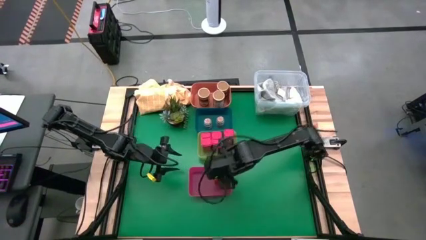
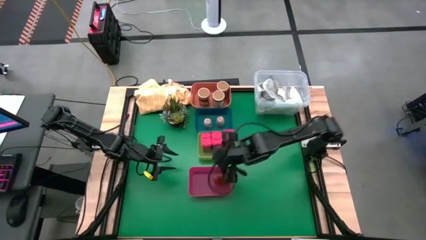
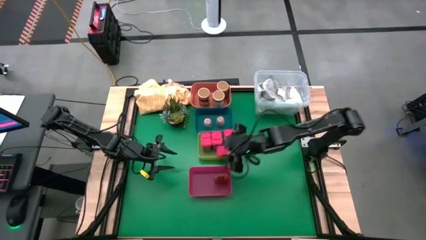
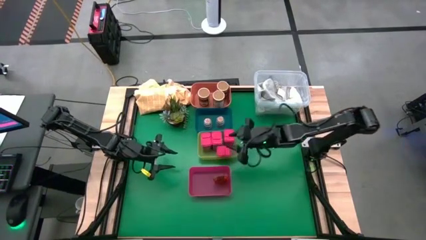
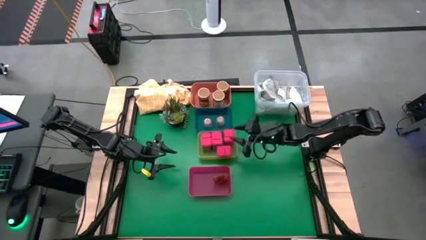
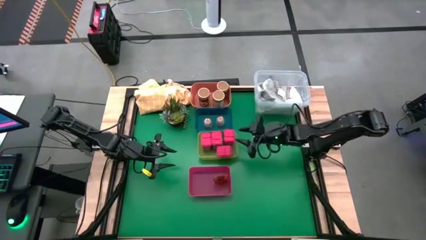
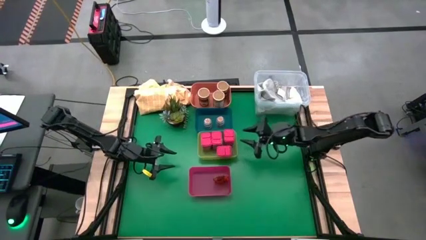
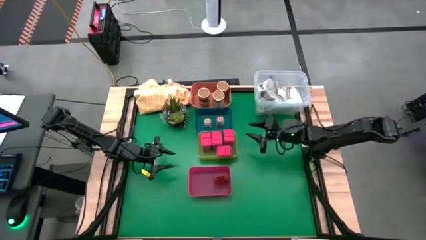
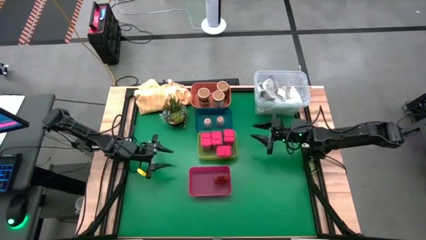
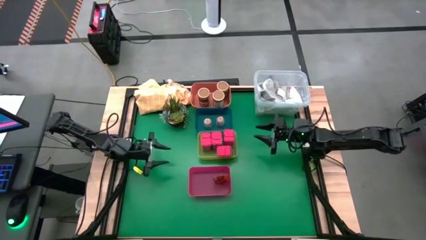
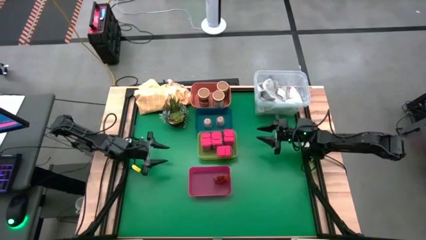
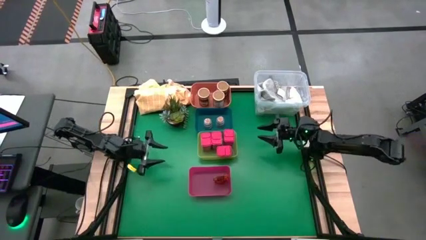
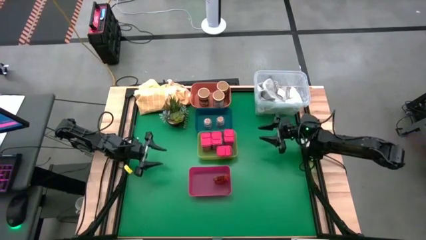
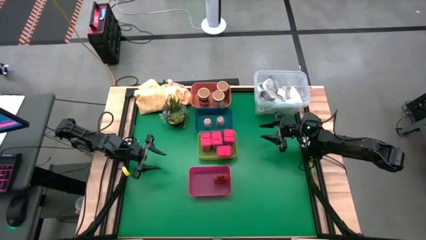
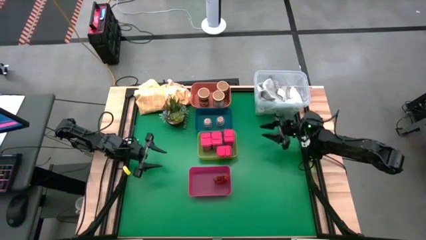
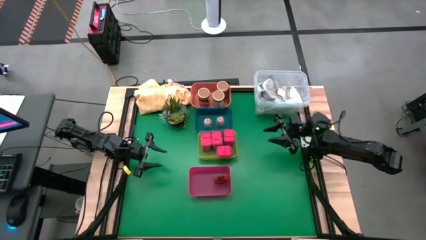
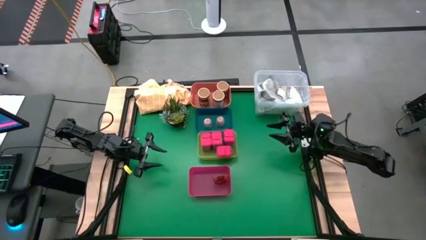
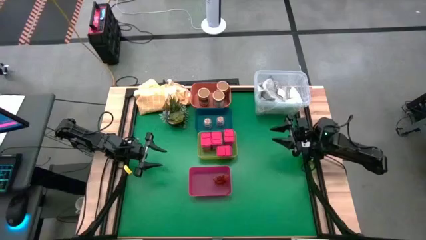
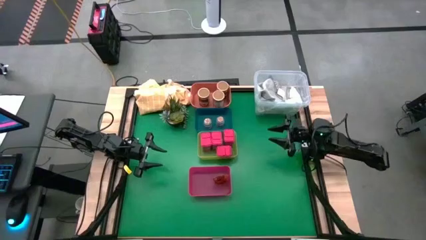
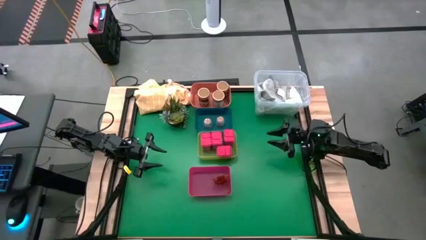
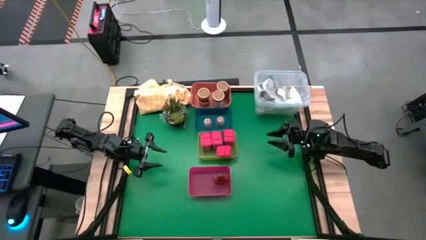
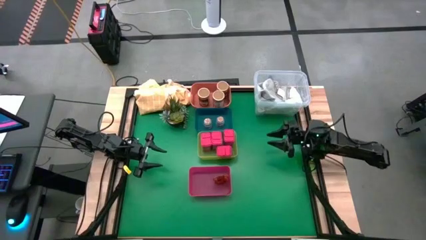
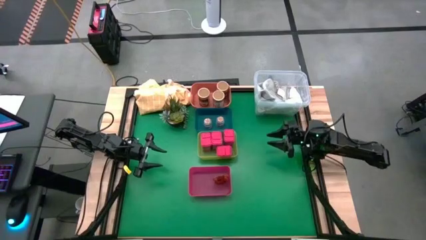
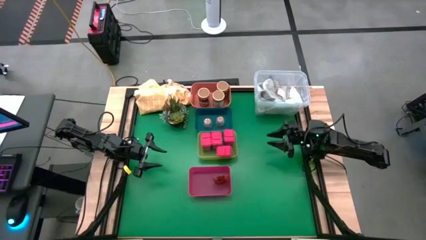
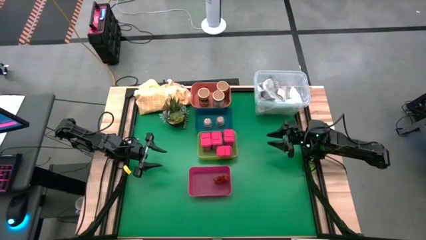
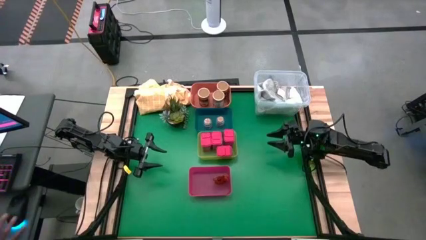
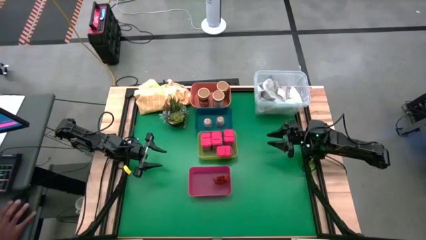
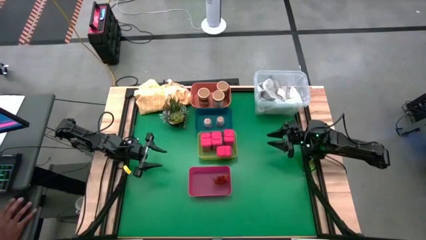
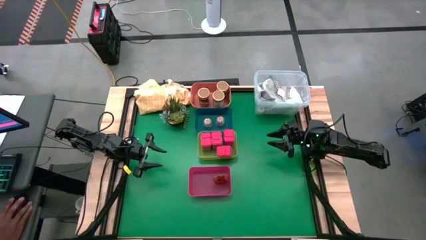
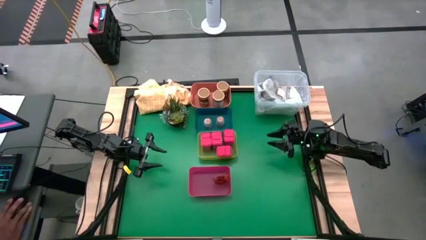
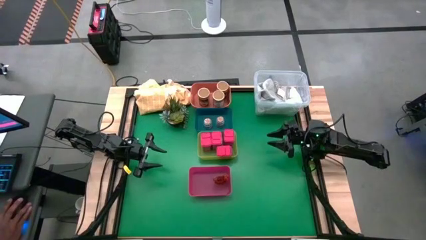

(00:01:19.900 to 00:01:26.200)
Task: Sort spices by type
Return to Home Position

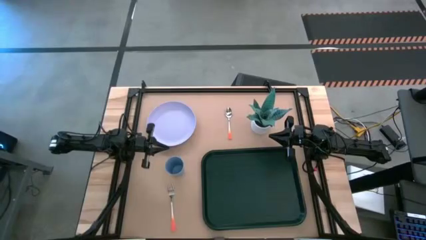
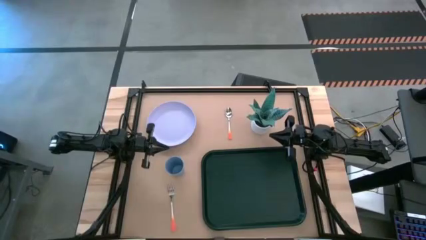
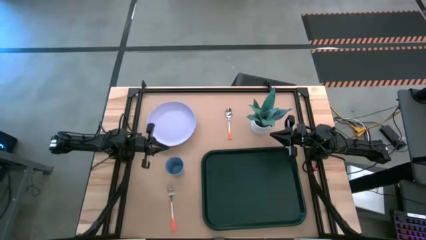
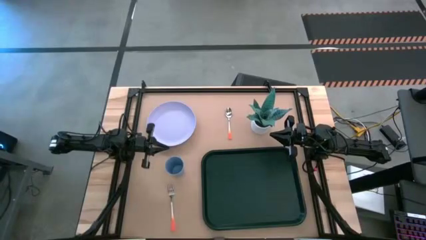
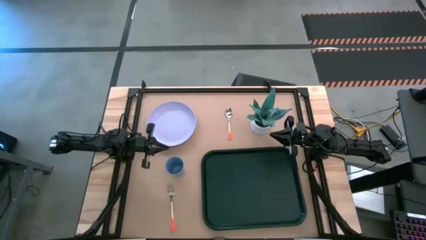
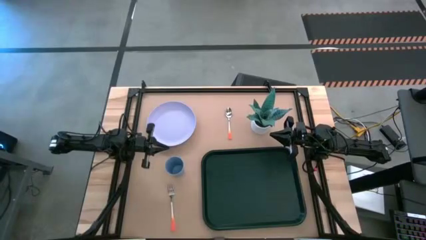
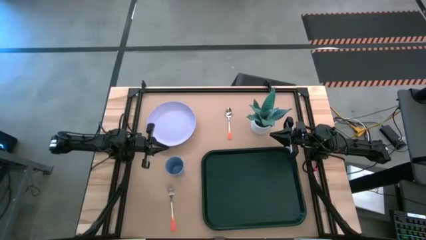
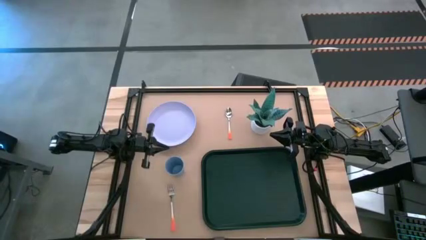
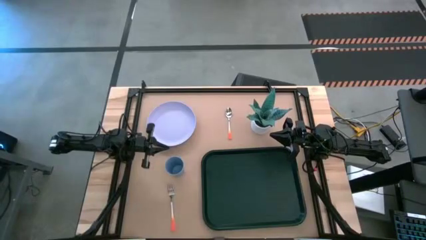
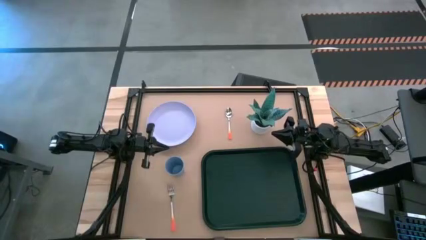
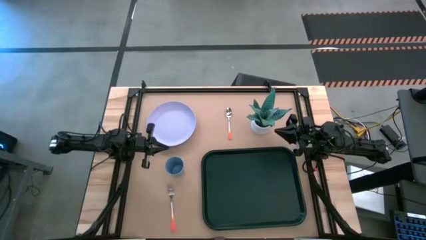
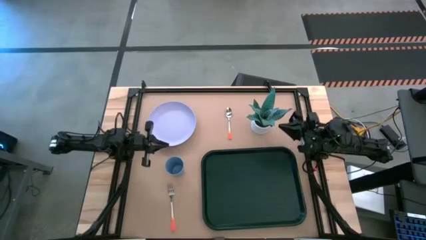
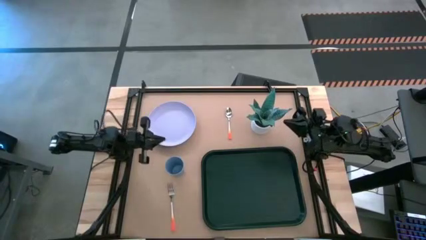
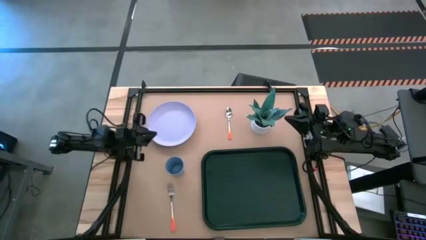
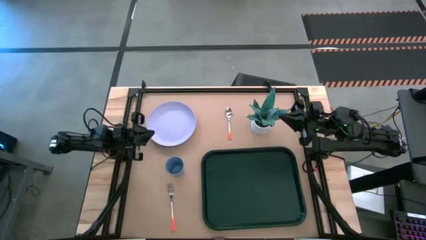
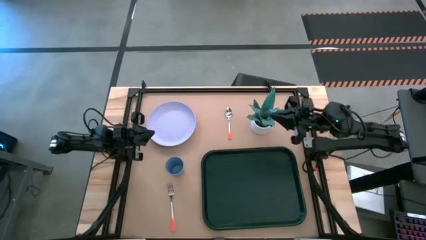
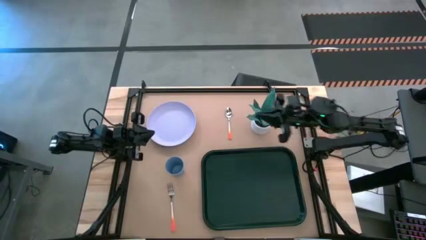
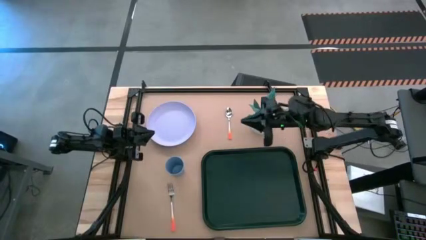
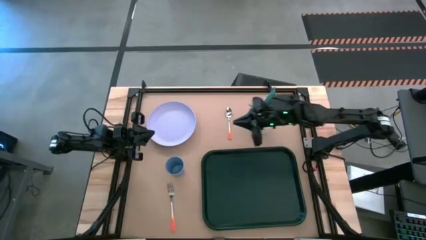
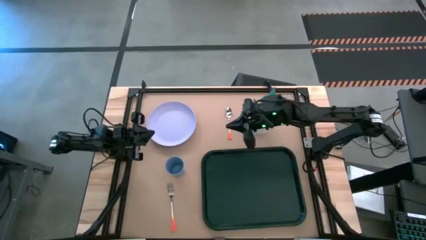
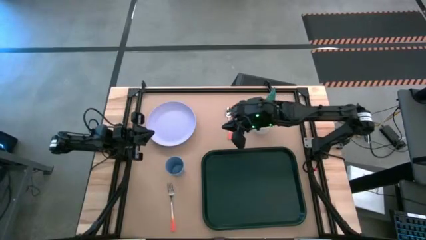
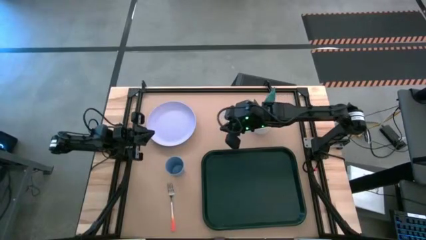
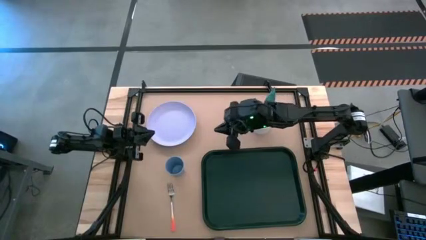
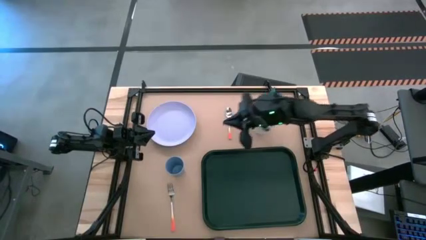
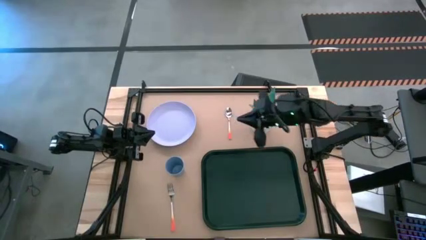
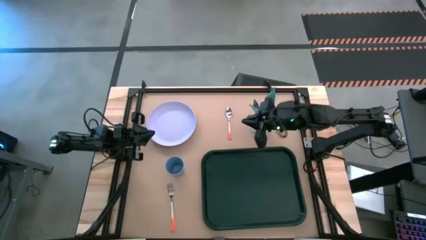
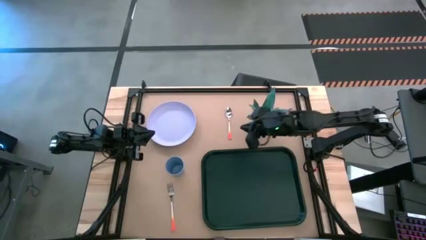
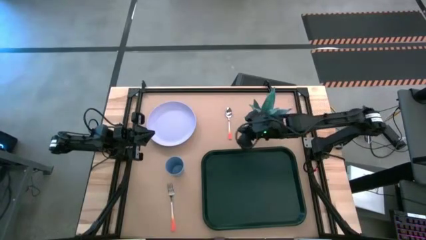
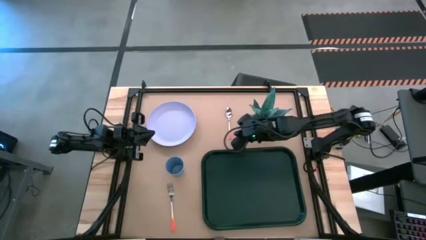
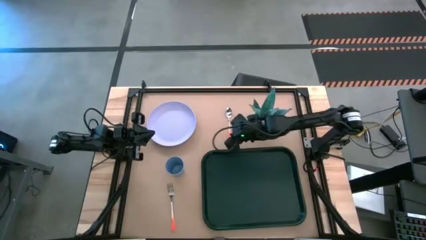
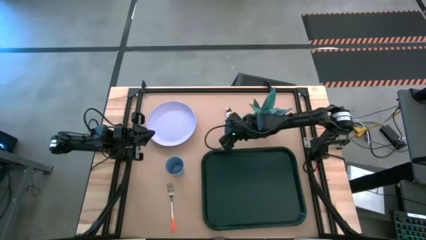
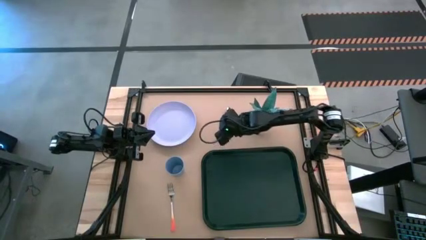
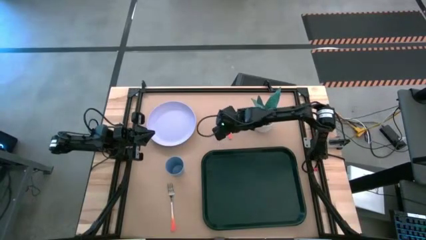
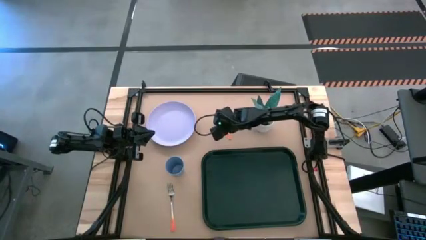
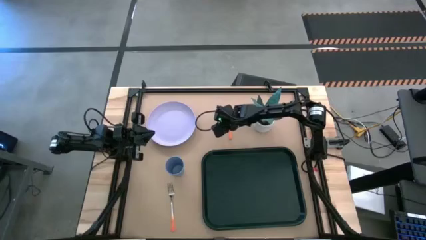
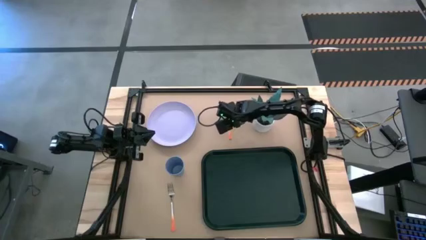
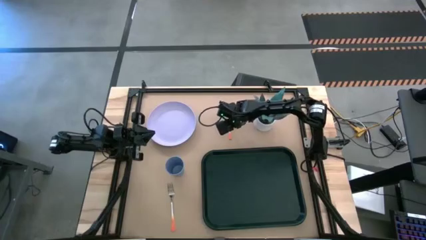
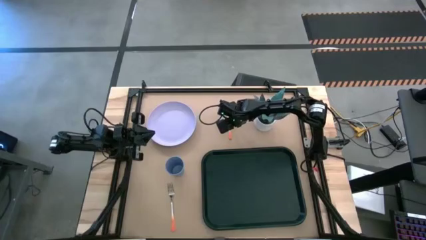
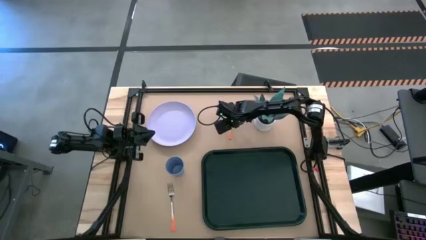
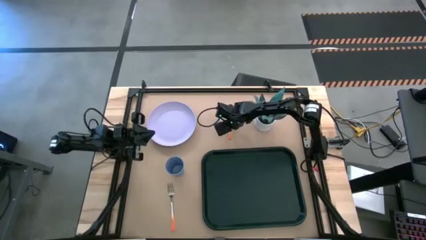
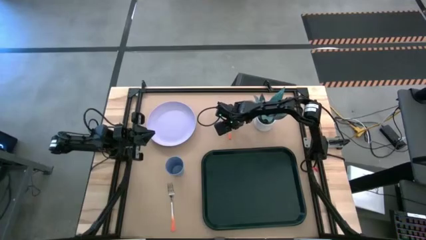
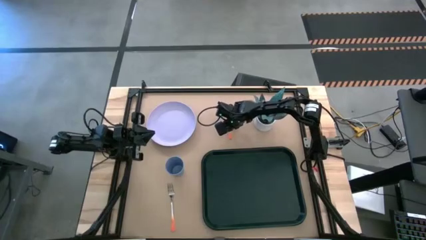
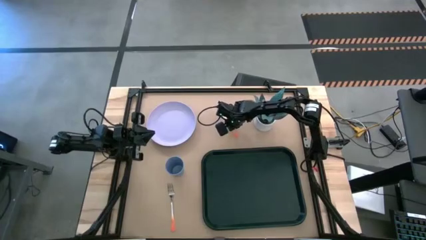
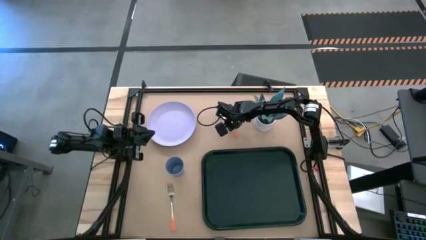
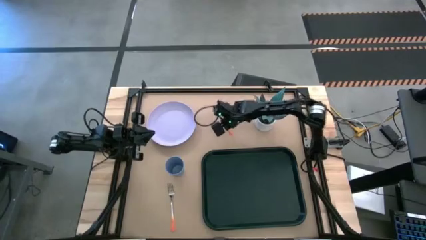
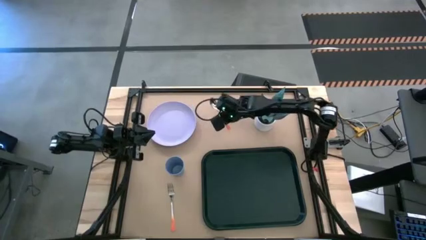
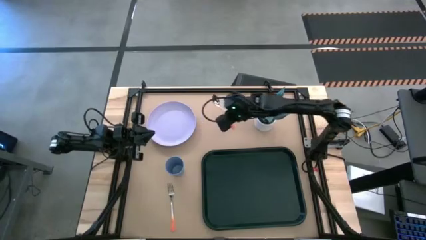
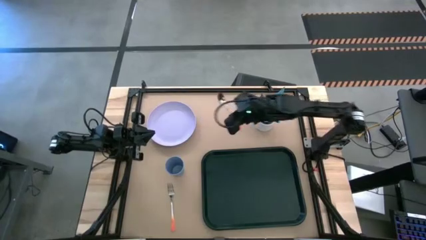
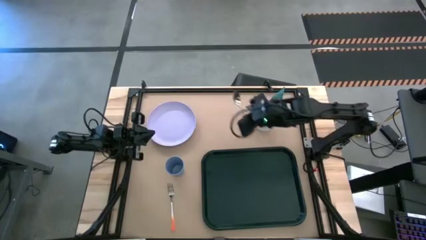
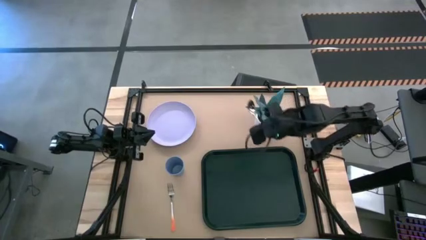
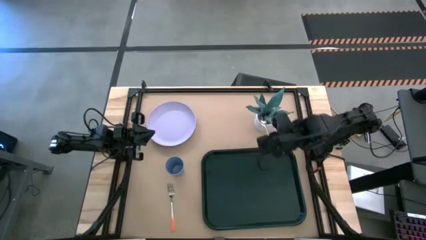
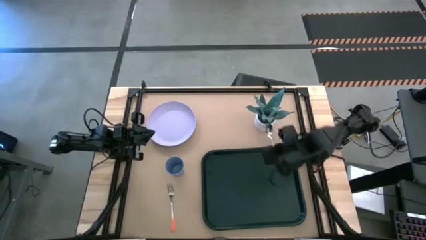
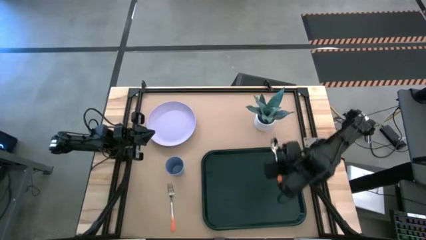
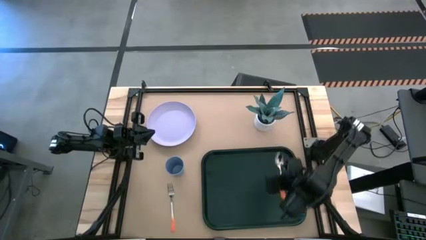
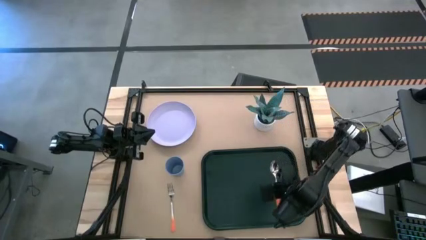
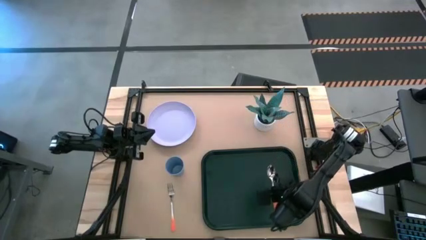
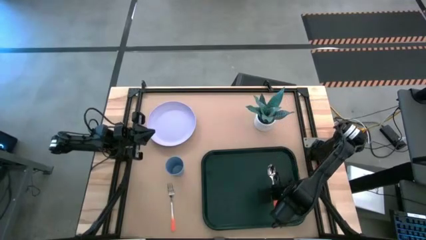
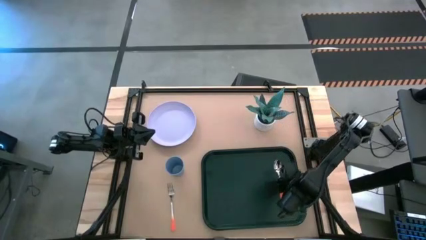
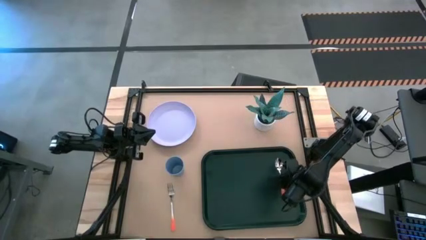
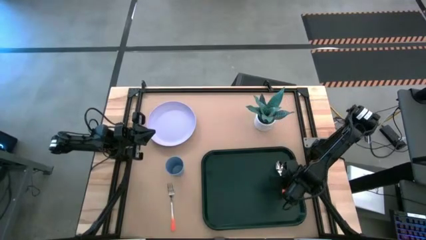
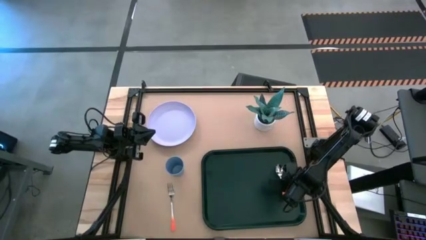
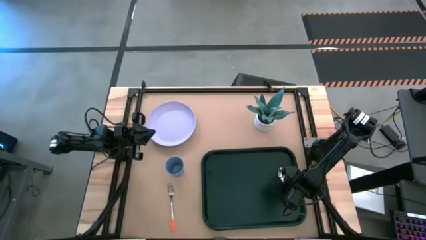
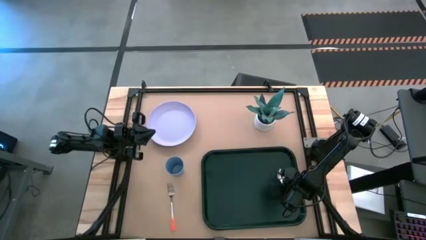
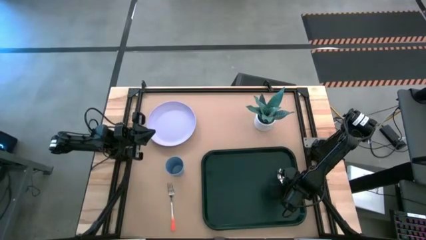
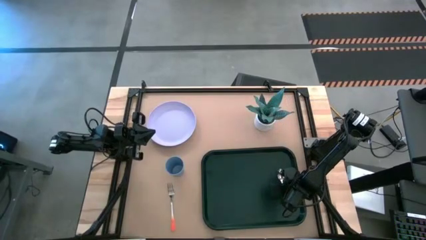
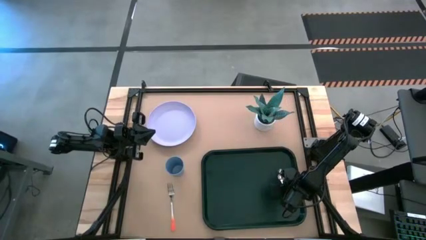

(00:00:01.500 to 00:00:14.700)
Task: Pick and place plate/cup/fork/spoon on tray
Put the orange spoon on the dark green serving tray
